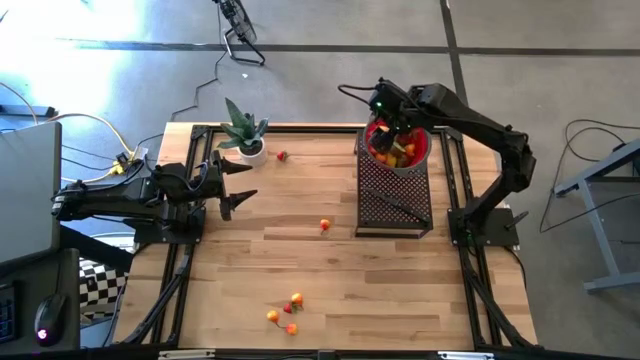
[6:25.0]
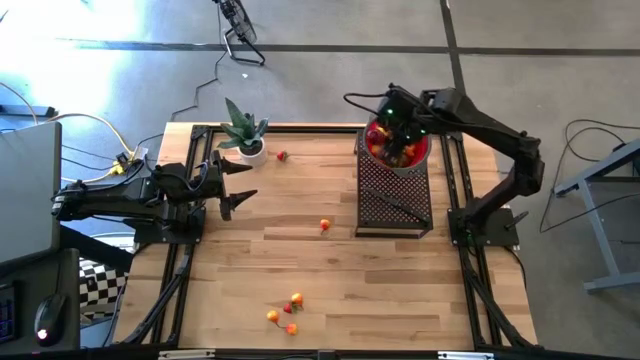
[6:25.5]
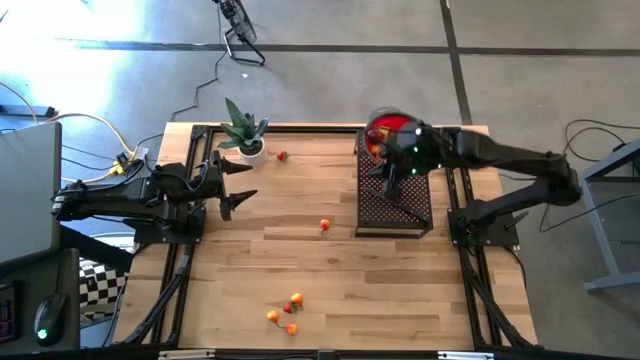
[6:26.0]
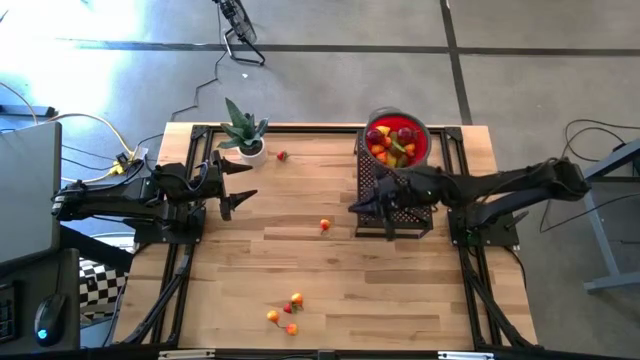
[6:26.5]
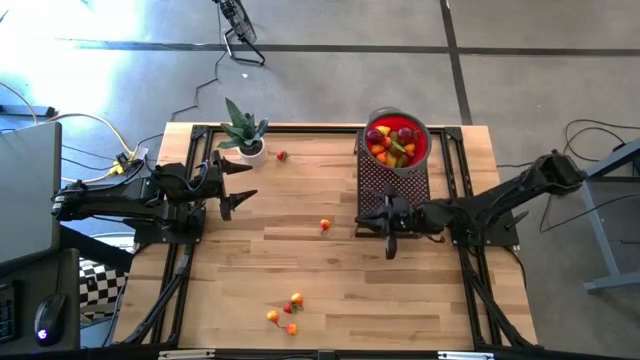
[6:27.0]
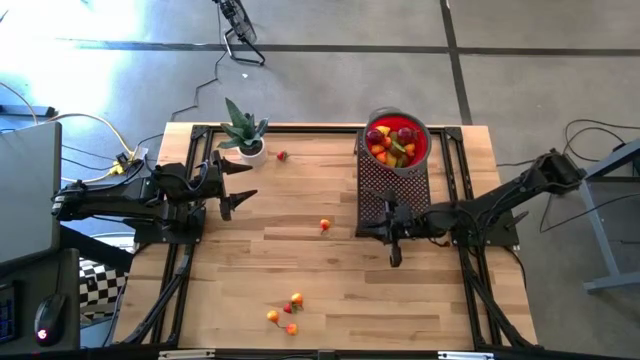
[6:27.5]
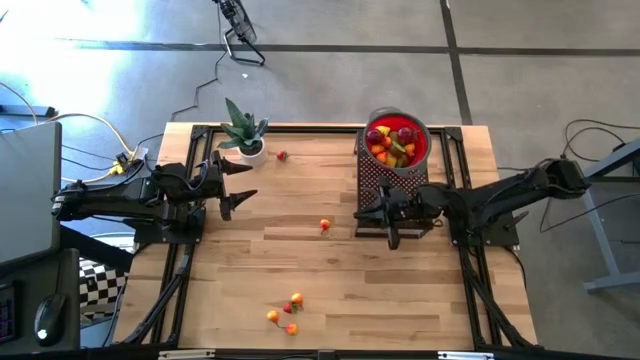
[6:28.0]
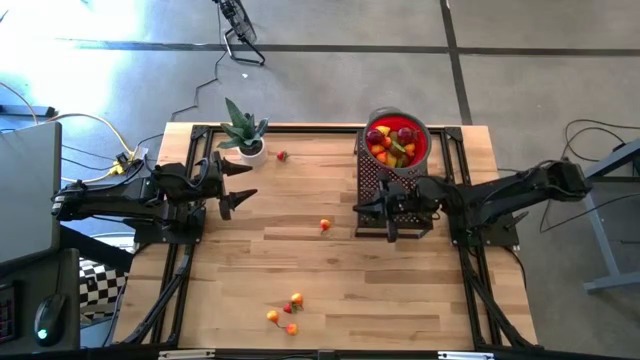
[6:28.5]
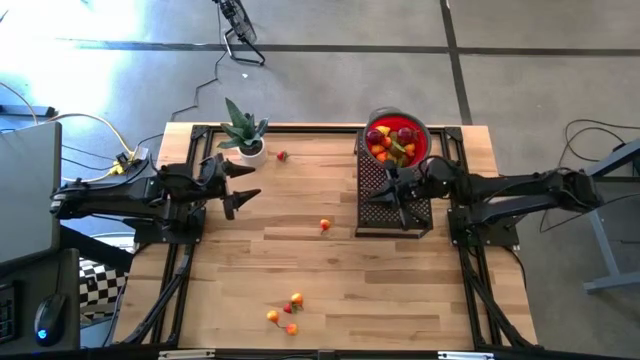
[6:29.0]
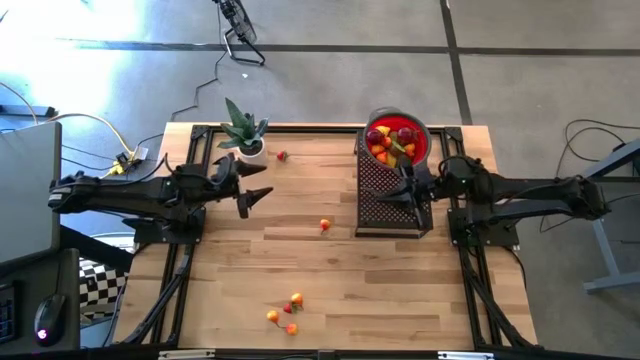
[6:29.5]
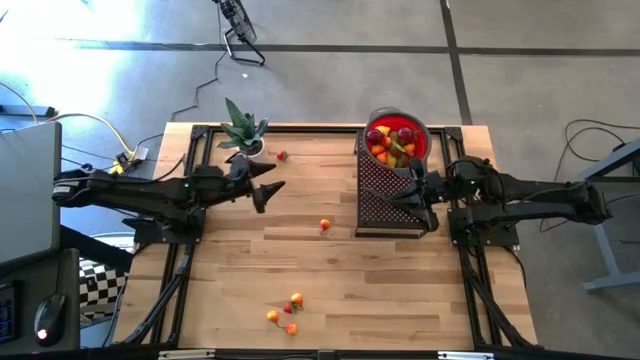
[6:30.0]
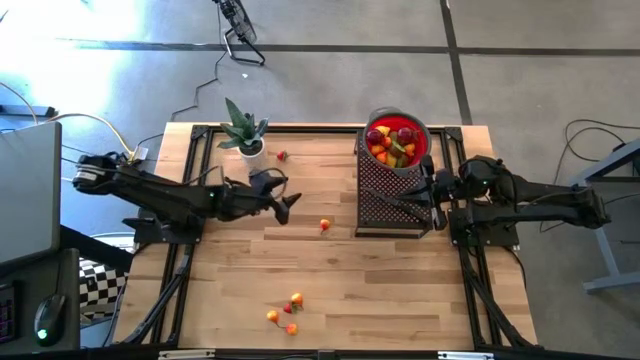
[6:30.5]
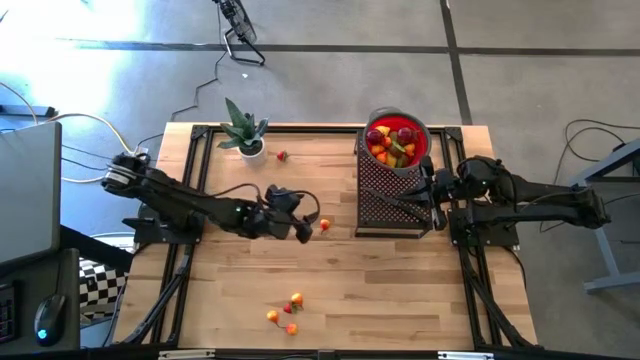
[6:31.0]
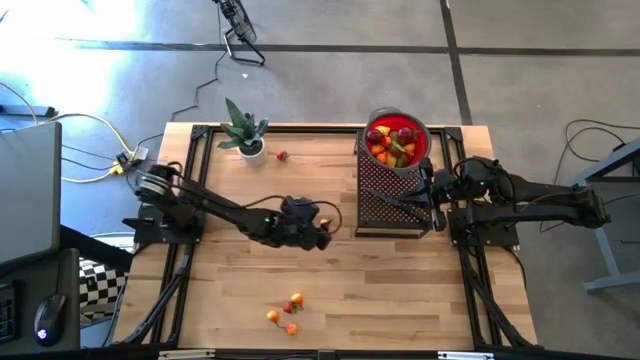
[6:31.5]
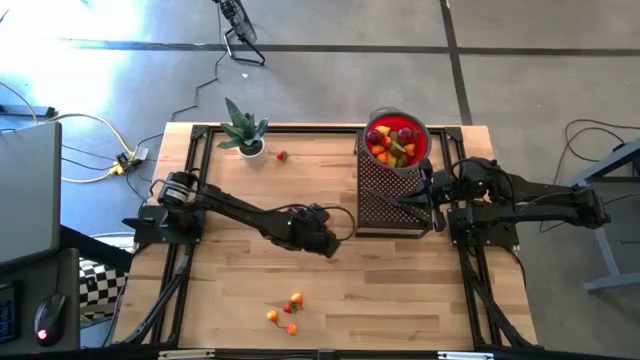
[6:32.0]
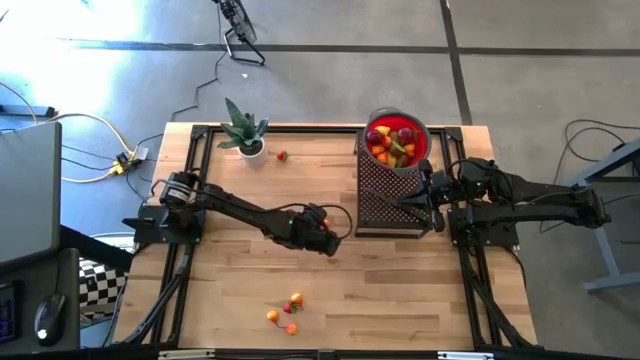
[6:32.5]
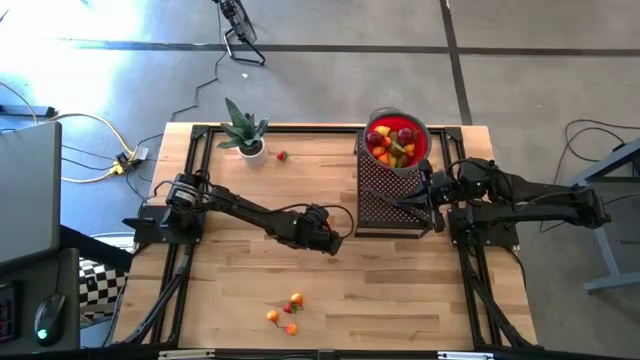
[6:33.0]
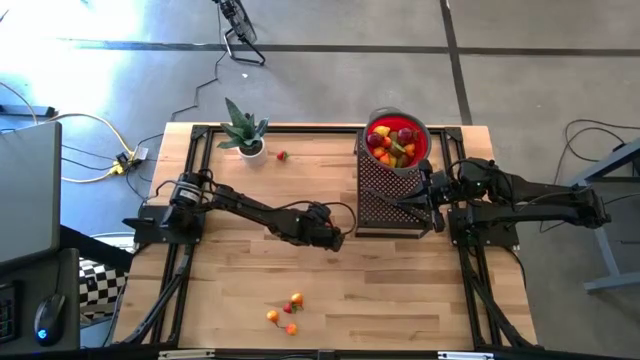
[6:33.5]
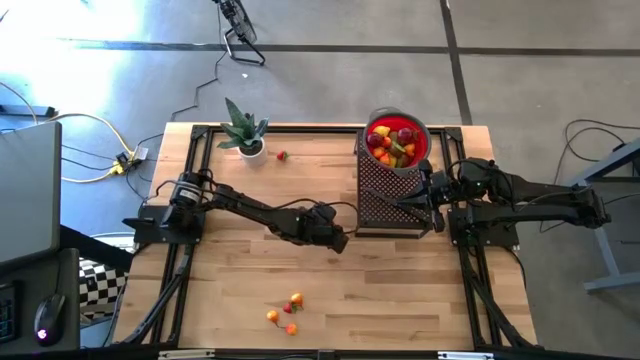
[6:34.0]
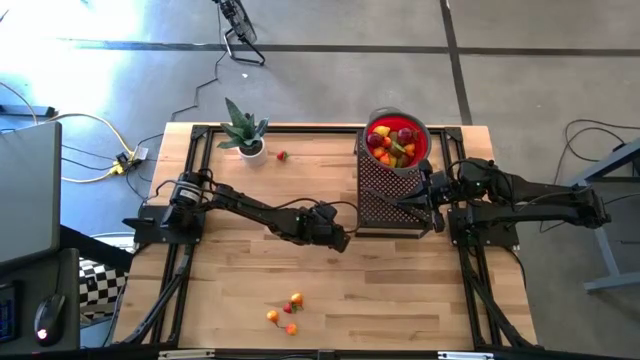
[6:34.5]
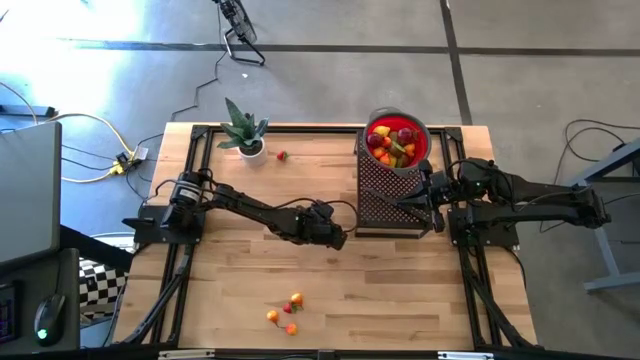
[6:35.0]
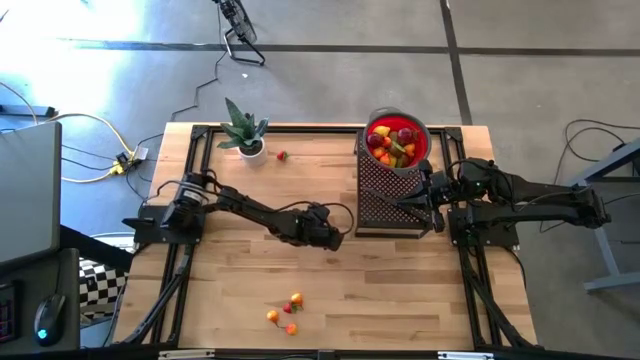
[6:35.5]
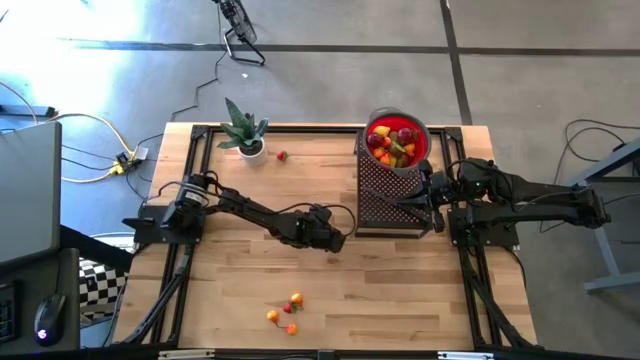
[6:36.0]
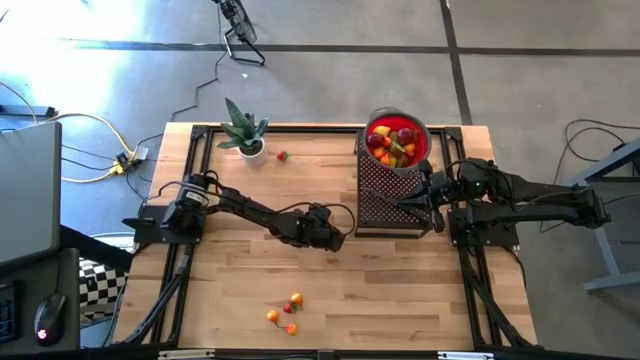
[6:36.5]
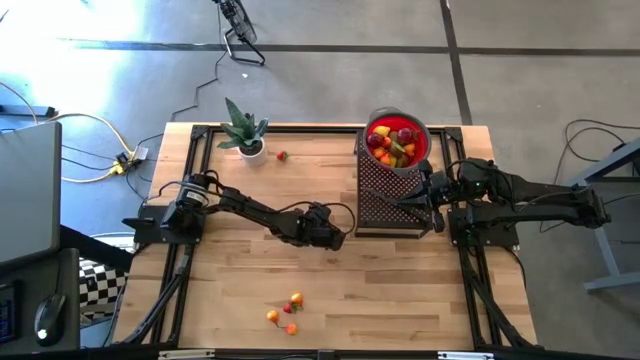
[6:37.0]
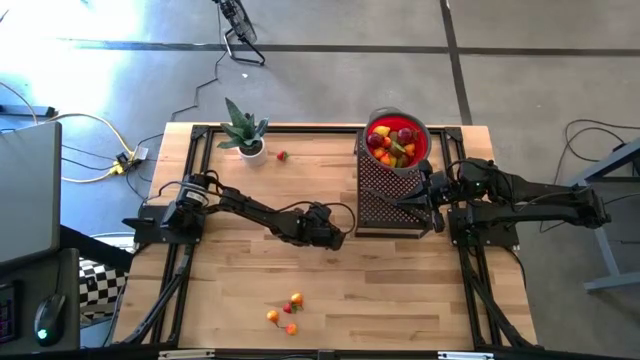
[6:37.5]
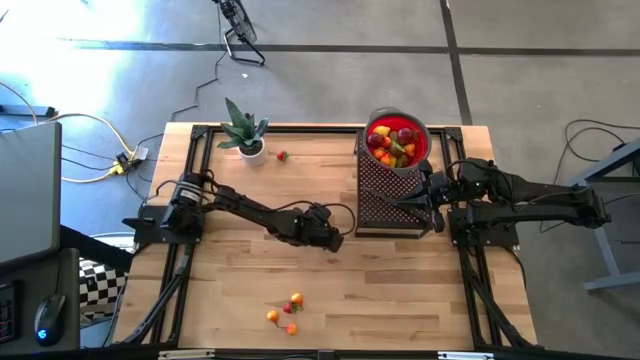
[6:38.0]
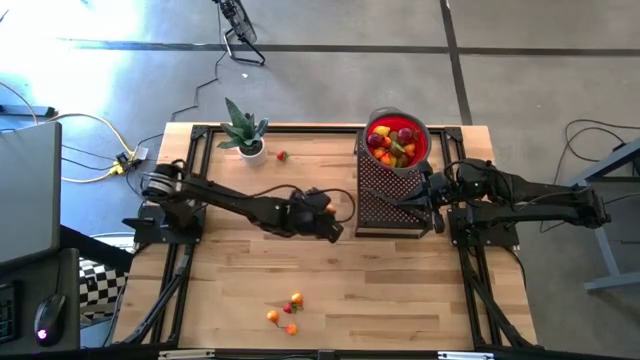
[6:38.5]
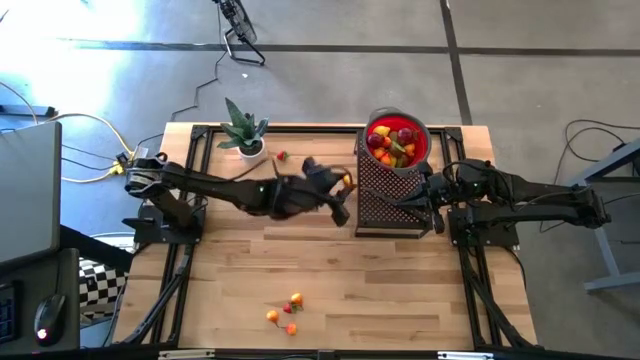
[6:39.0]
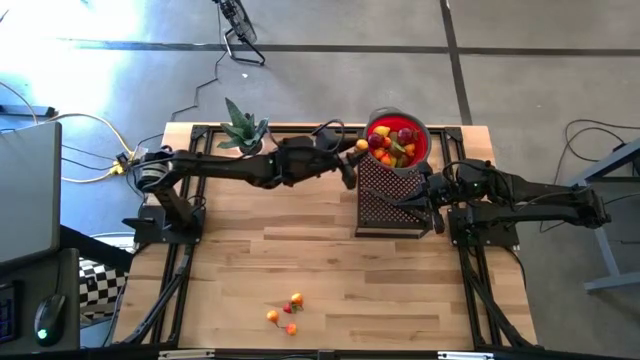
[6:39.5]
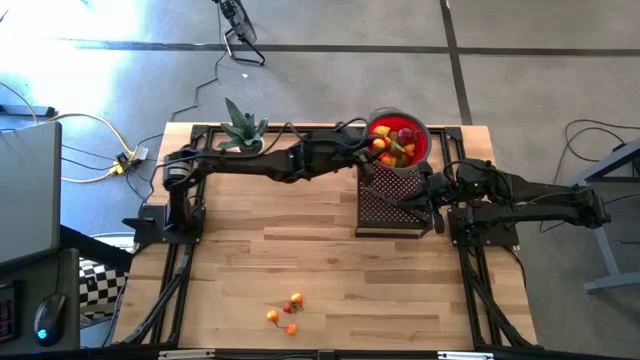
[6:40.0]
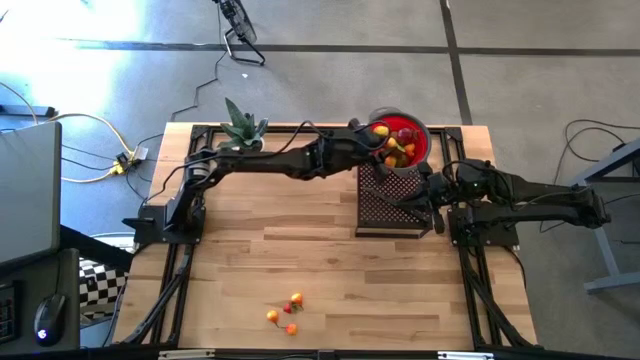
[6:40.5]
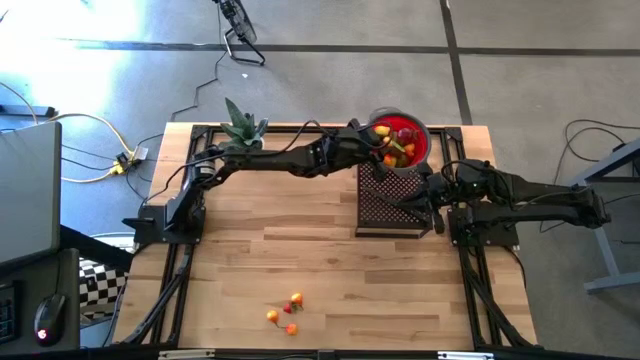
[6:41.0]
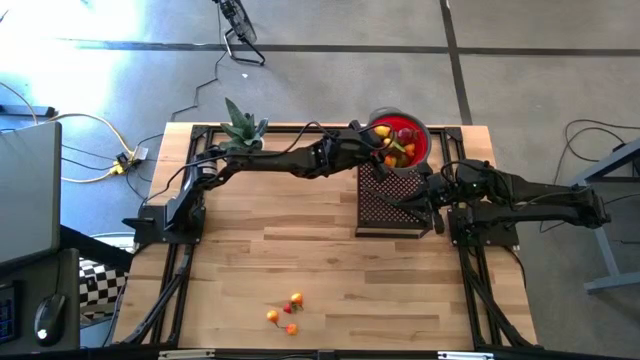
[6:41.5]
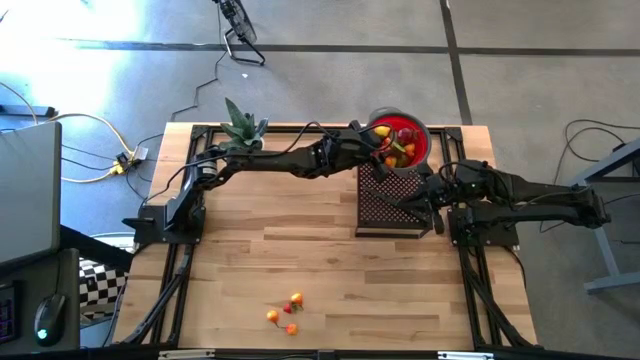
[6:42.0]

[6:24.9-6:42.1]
Task: Pick & Place Fruit
Put the pear into the strainer bowl on the shelf

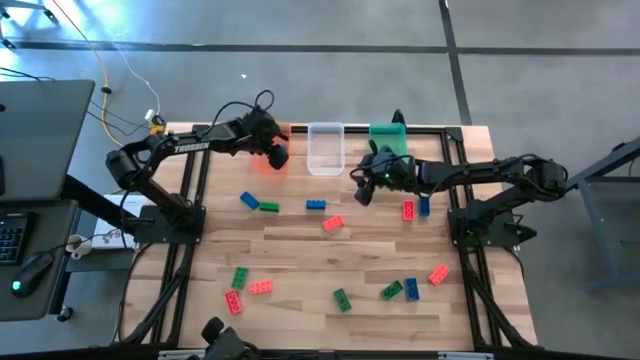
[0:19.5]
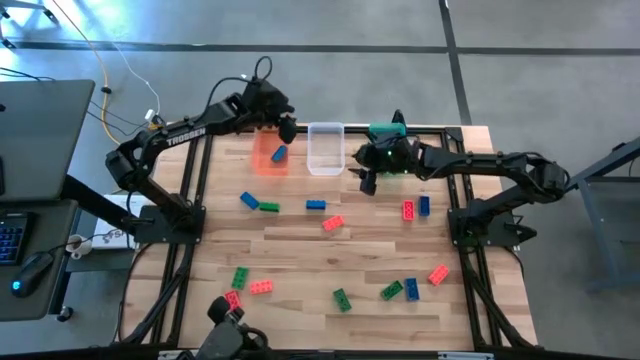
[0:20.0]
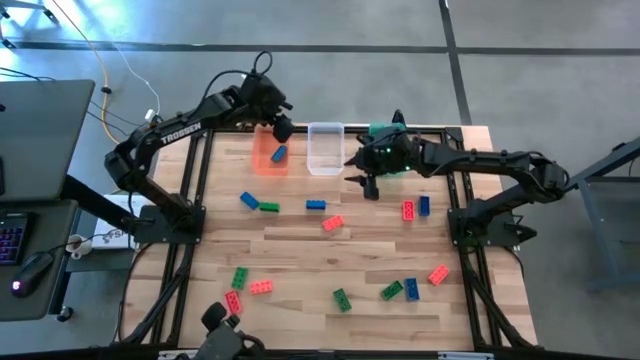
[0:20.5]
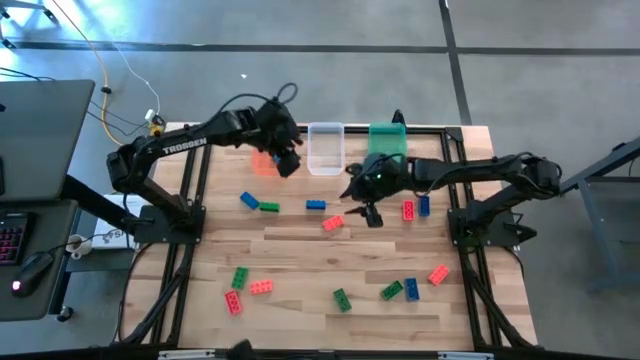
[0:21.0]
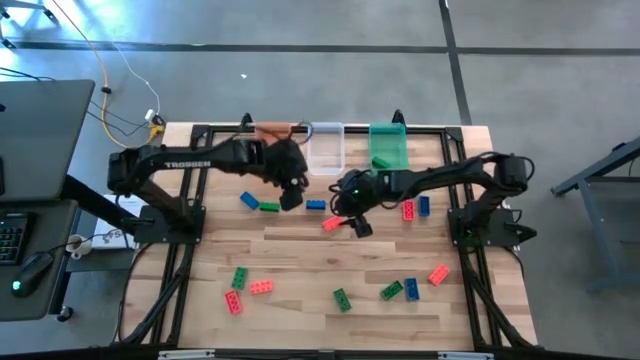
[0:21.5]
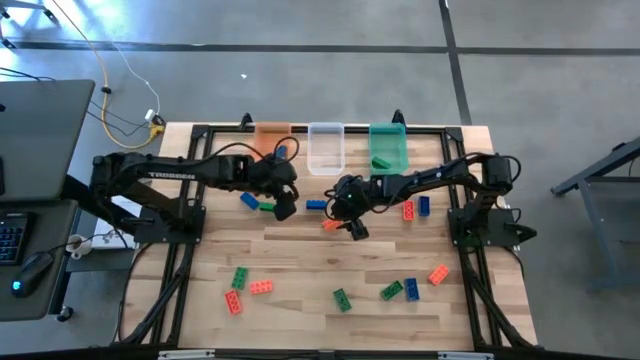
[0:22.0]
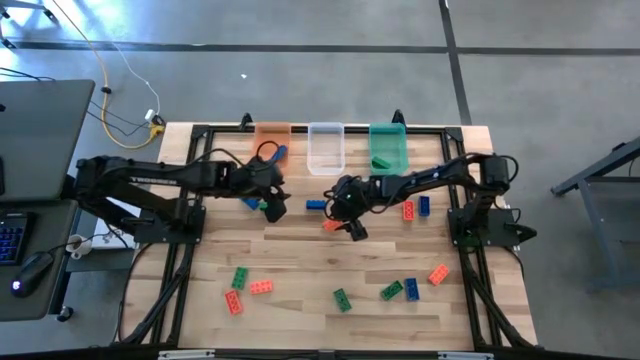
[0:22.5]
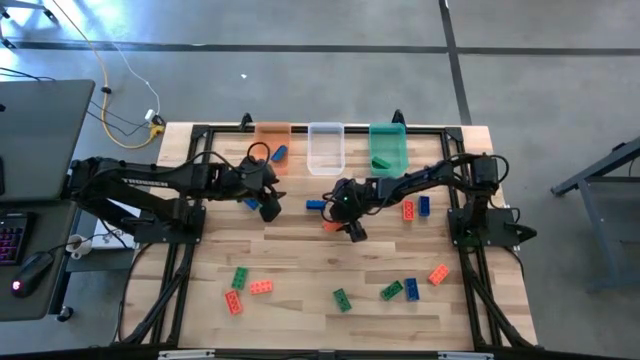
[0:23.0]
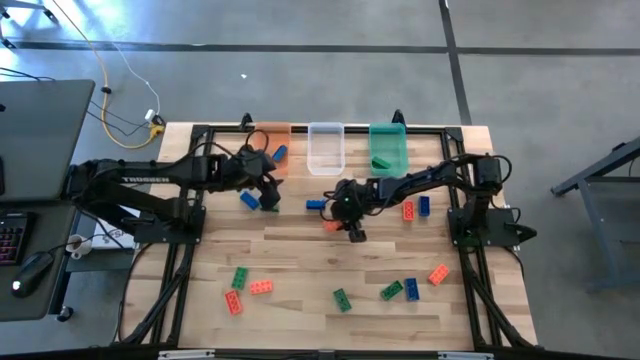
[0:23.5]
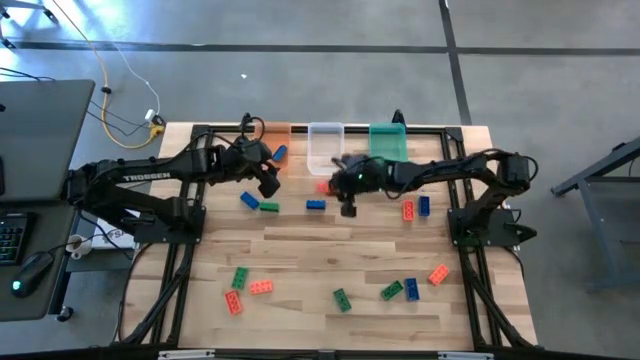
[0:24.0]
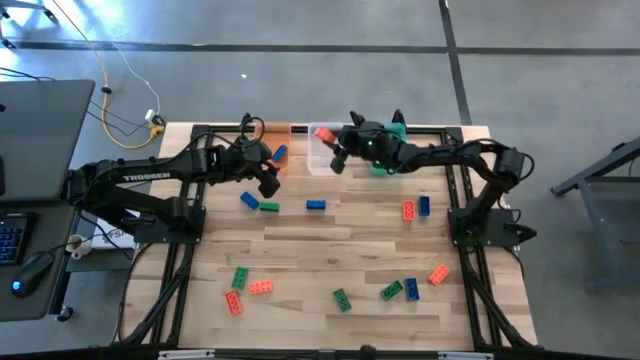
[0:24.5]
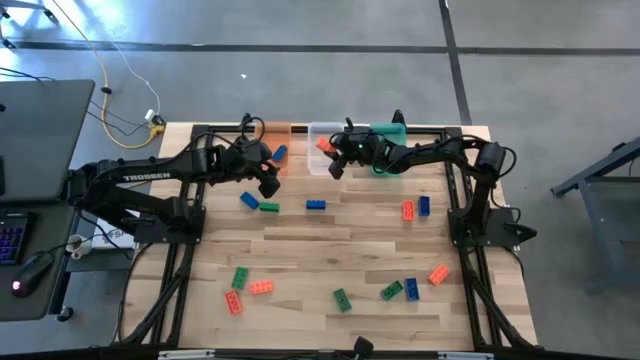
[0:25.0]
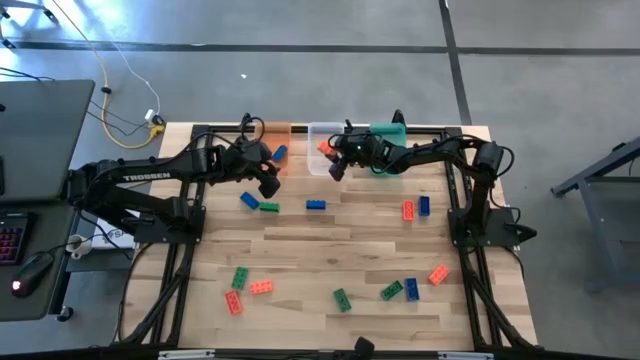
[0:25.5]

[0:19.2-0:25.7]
Task: Sort & place blocks by color
Put the orange game piece into the white bin
